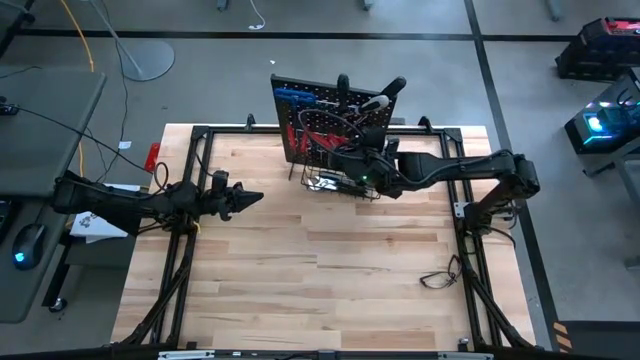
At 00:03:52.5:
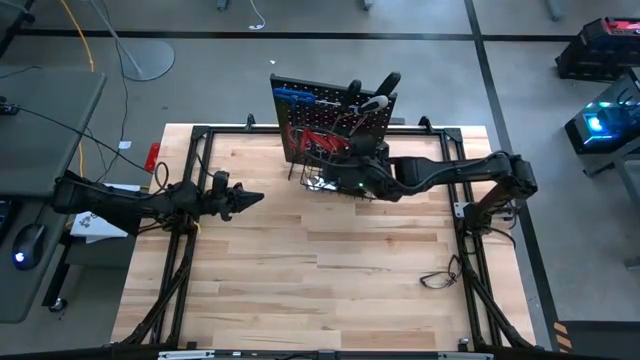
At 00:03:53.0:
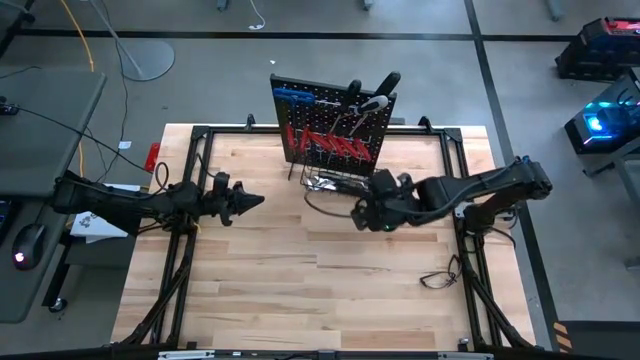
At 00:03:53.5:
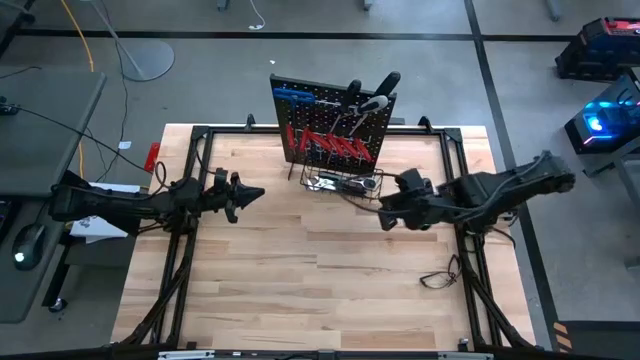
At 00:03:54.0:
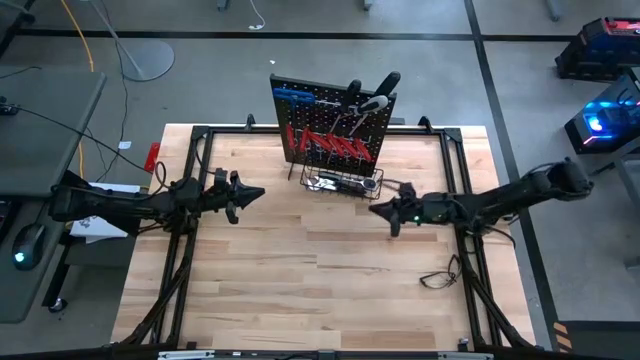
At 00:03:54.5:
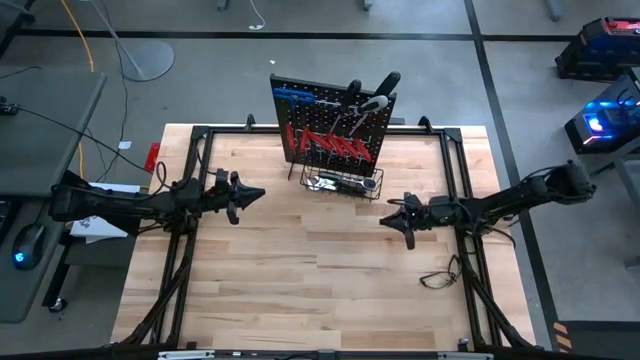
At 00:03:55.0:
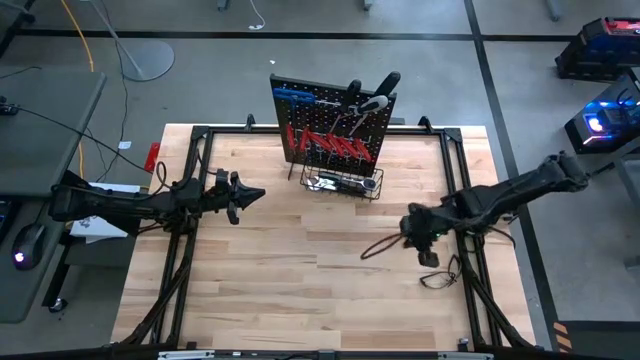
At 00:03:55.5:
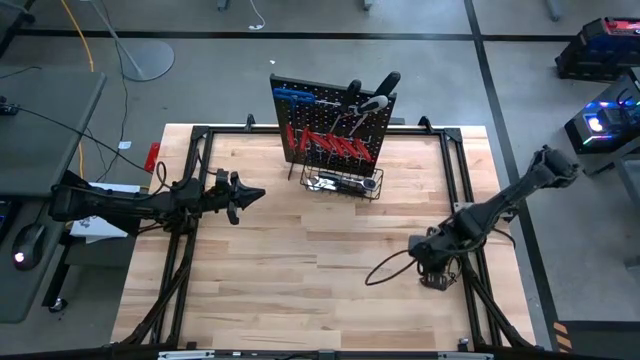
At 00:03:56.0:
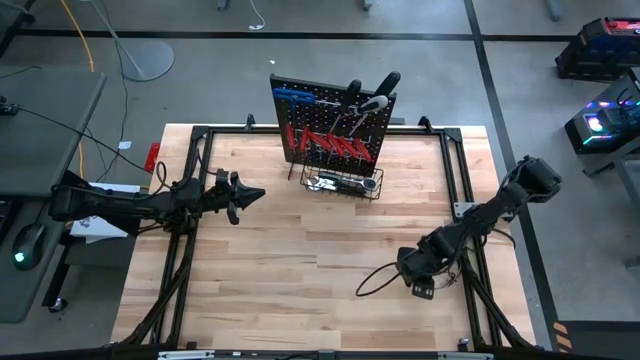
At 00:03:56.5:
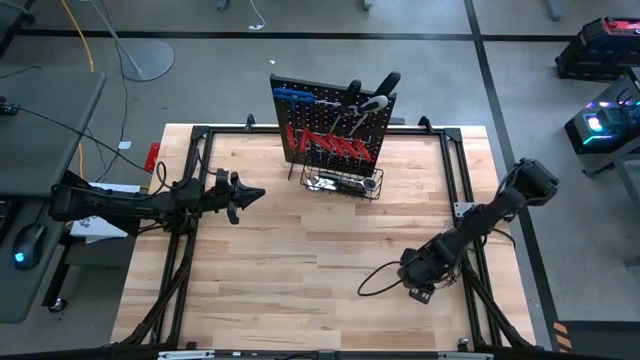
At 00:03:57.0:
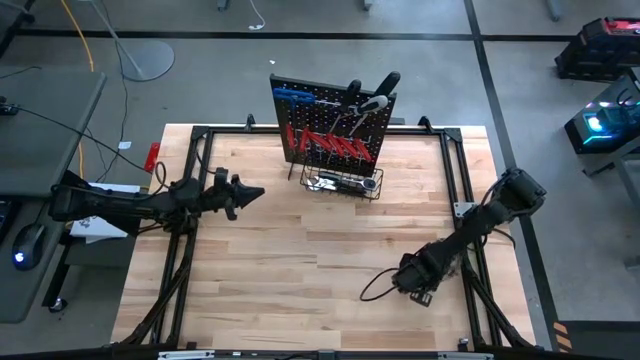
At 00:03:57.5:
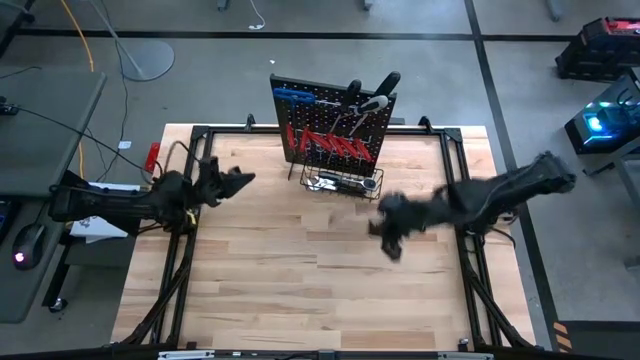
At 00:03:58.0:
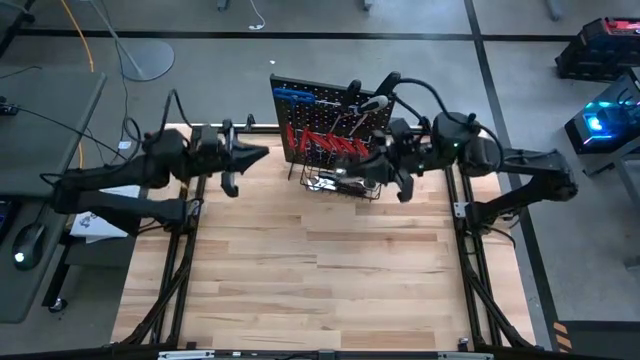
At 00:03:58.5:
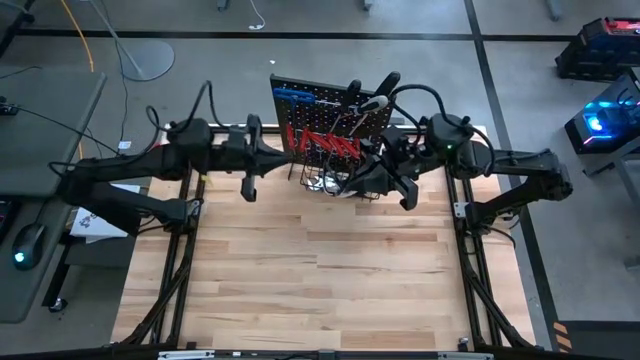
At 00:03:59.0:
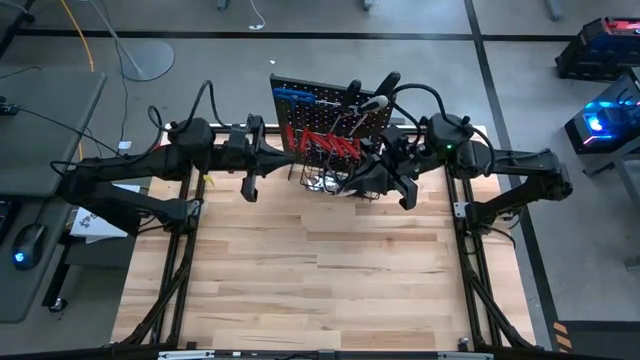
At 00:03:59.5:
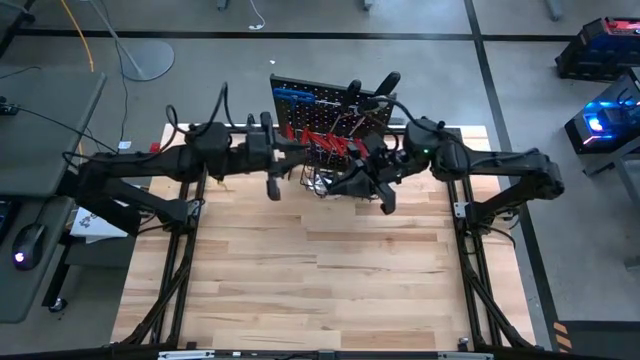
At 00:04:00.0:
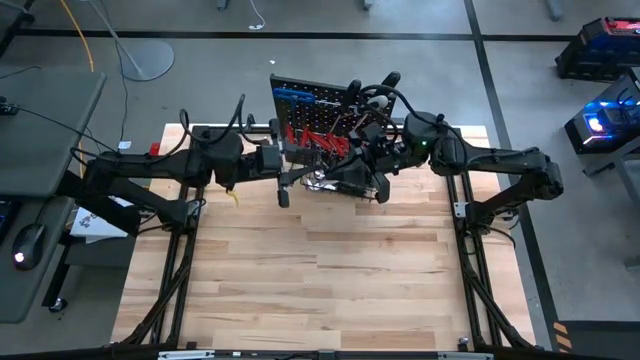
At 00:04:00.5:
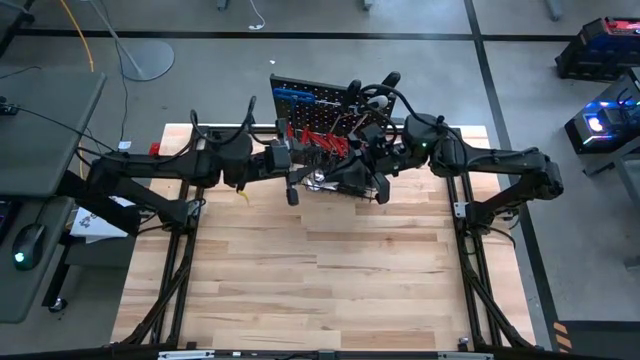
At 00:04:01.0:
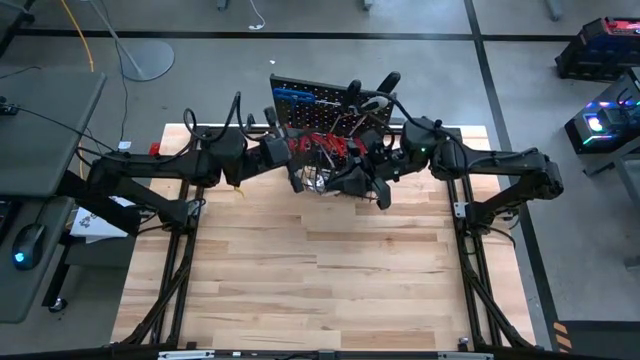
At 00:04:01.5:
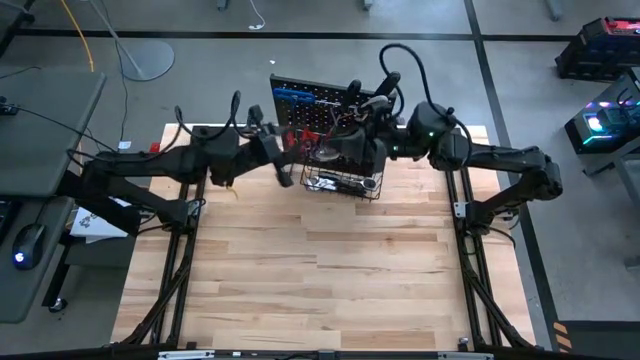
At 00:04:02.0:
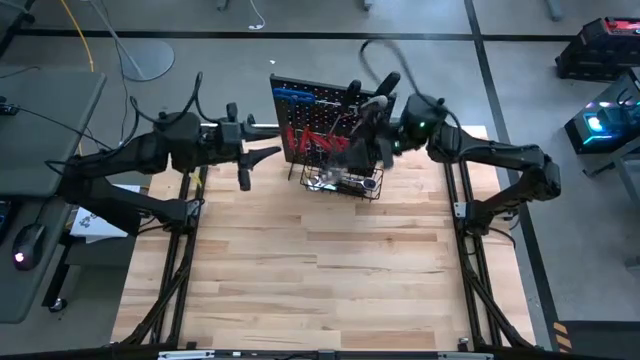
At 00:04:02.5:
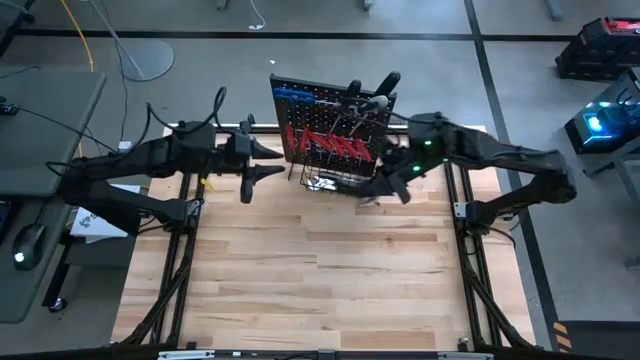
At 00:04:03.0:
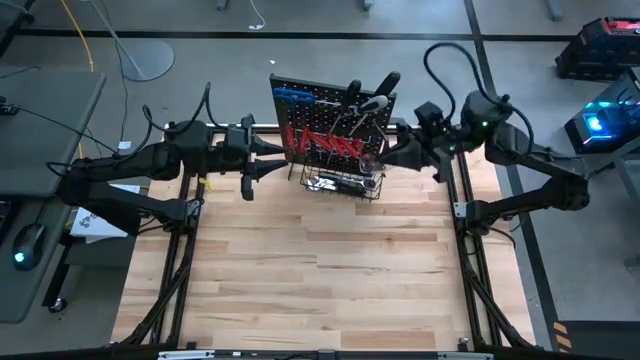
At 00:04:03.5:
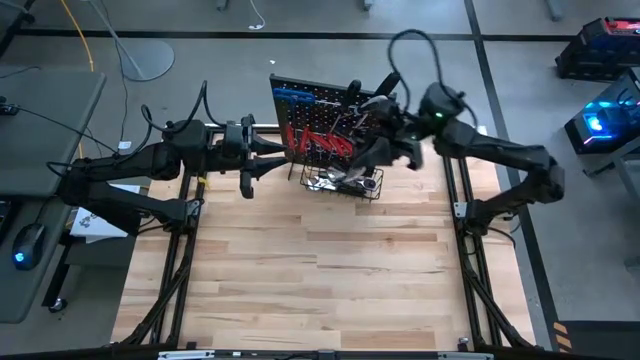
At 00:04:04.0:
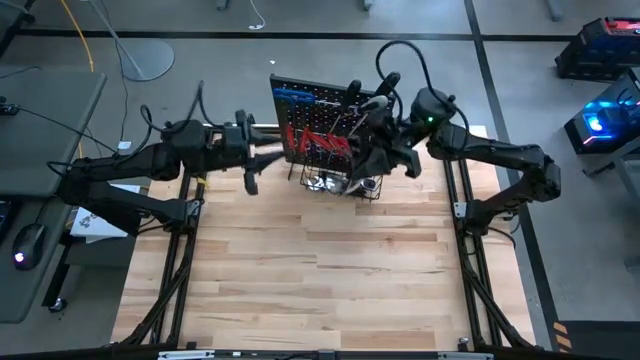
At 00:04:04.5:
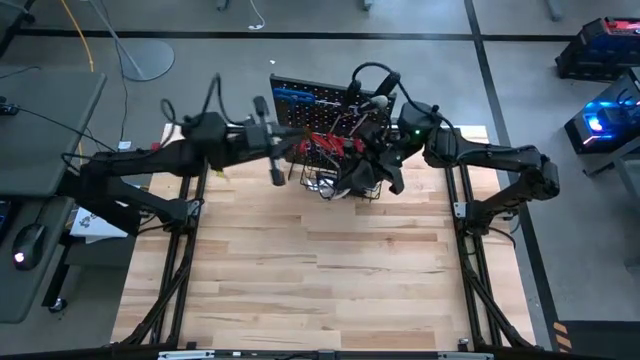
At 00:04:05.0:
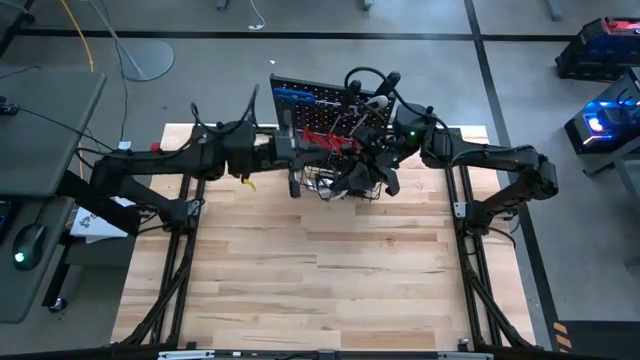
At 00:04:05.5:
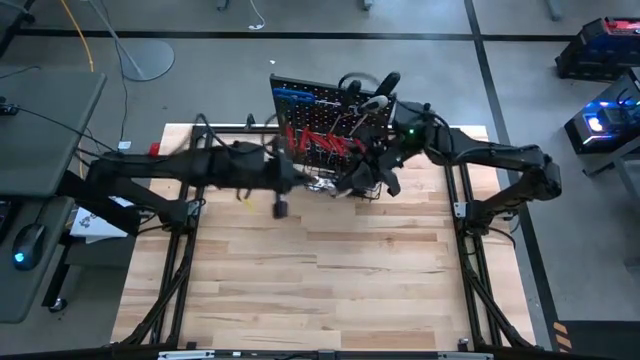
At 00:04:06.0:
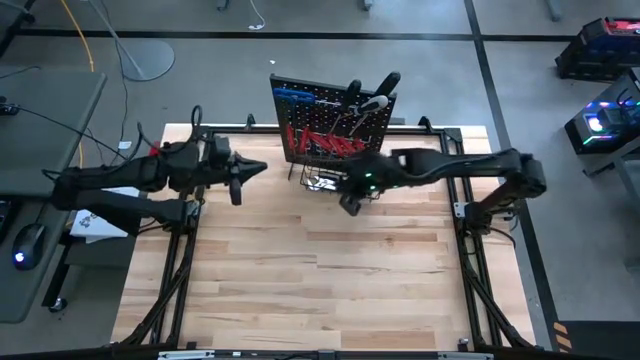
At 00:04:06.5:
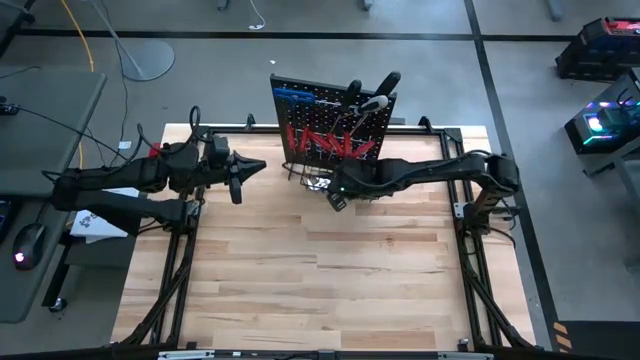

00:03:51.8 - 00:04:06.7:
Task: Hang tools onto peg board
Put the safety goggles into the wire basket on the peg board

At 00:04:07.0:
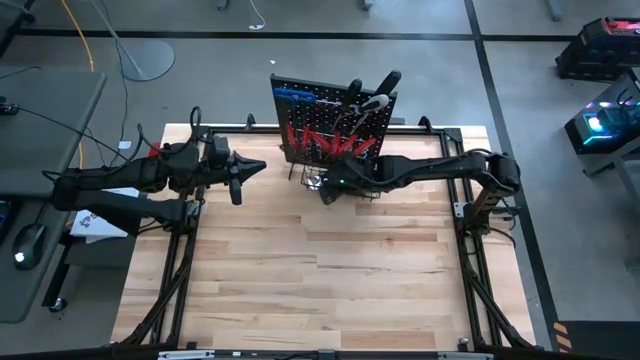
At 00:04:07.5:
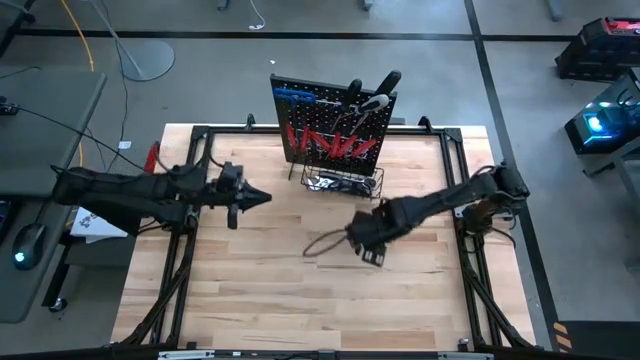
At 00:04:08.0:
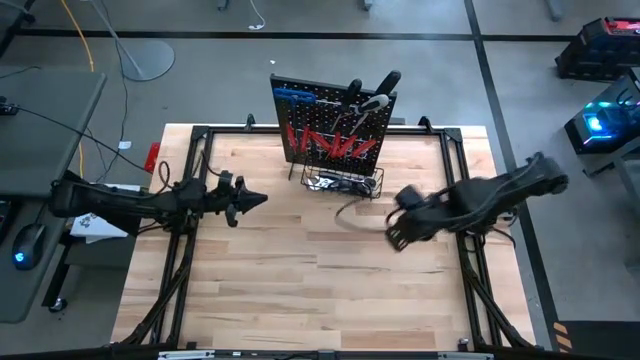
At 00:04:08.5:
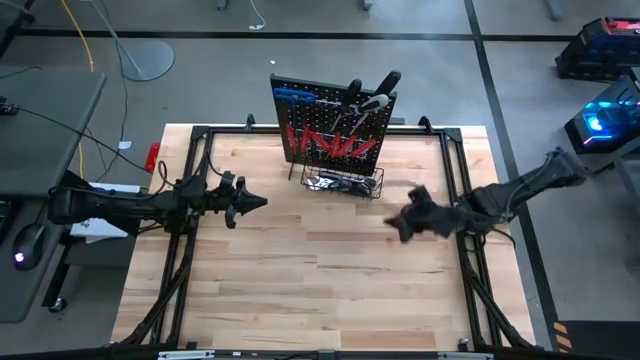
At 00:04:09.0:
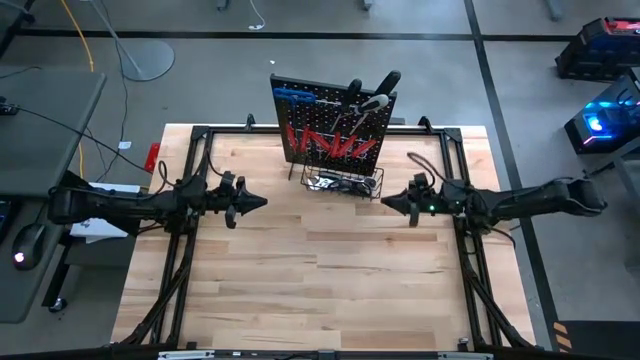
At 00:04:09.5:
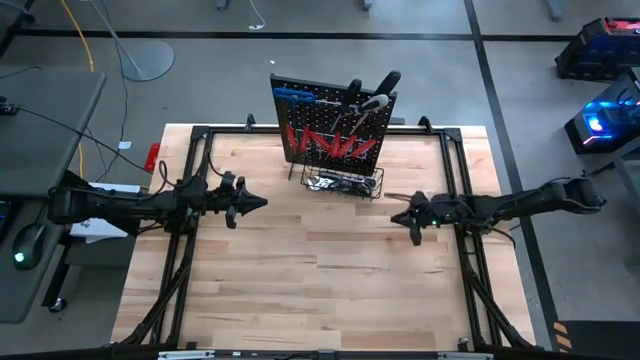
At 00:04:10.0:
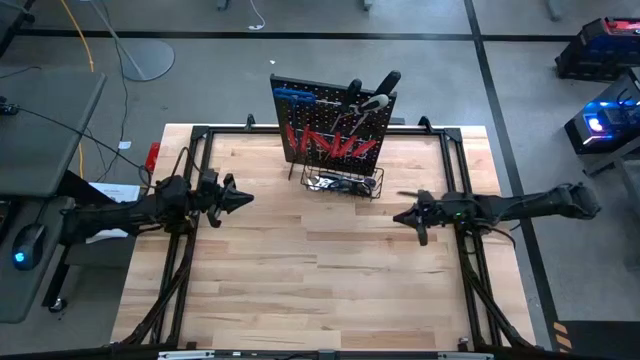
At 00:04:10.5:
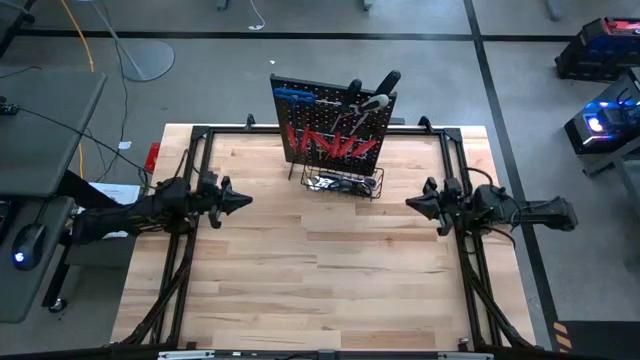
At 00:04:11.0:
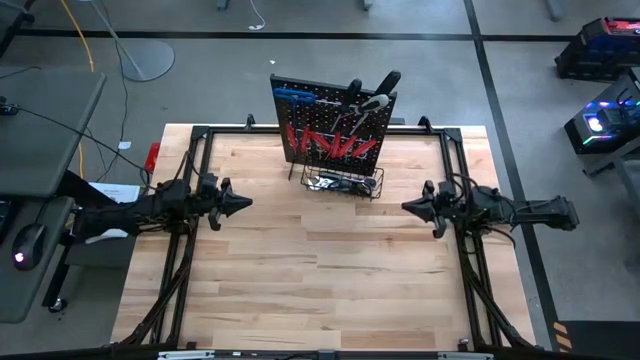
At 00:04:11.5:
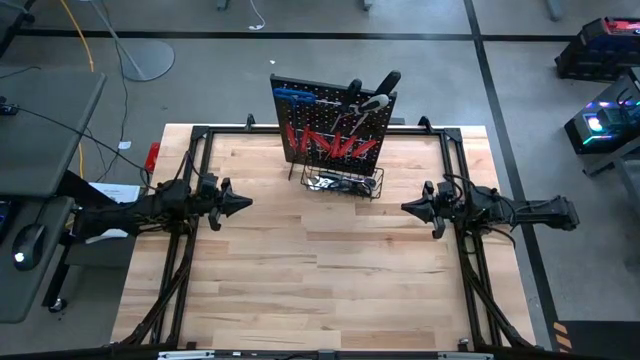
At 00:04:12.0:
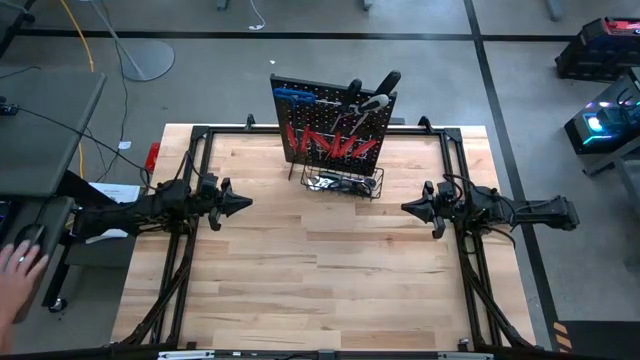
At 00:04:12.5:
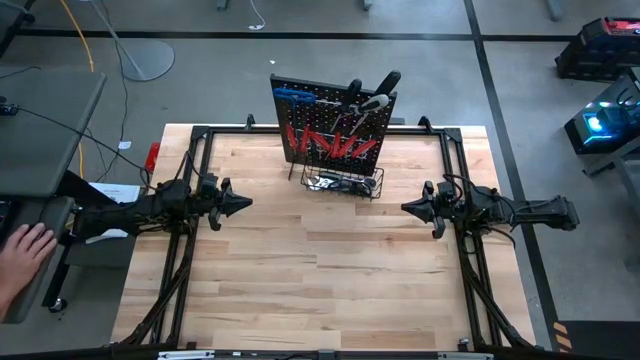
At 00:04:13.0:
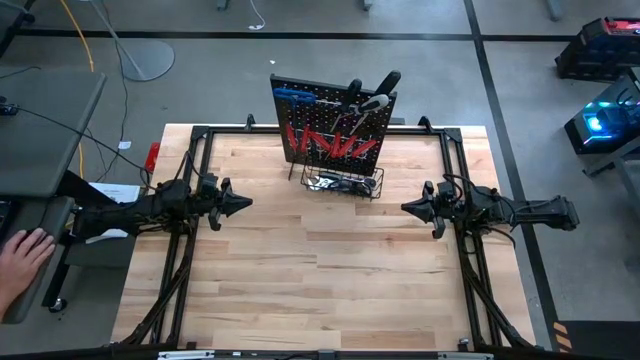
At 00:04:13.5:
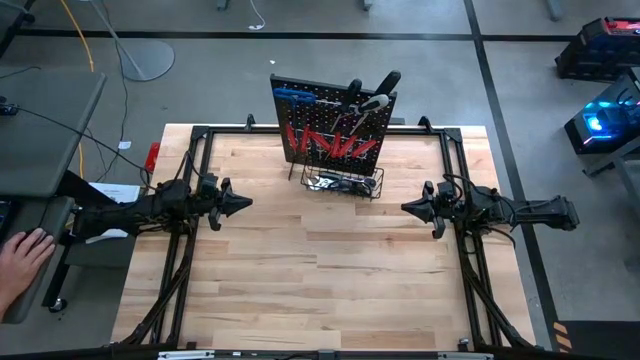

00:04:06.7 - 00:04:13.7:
Return to Home Position
